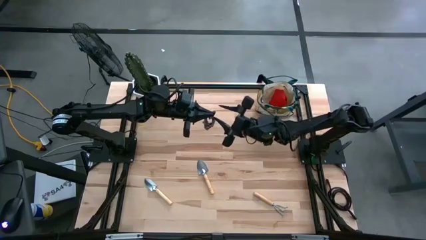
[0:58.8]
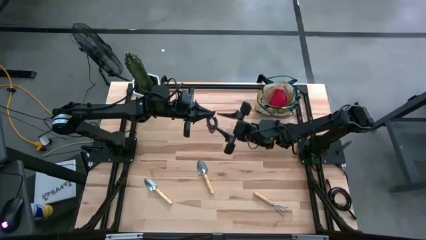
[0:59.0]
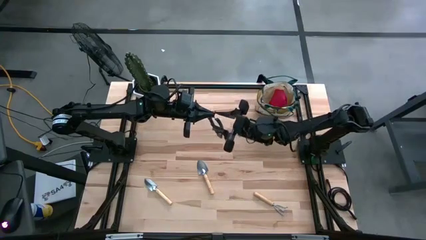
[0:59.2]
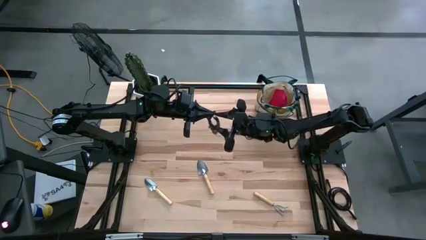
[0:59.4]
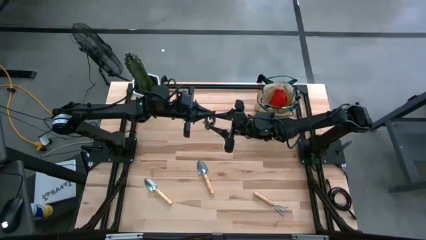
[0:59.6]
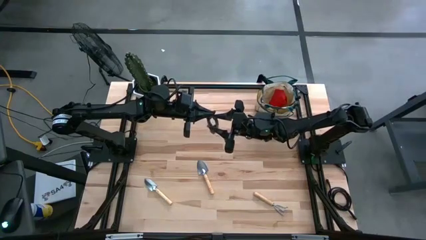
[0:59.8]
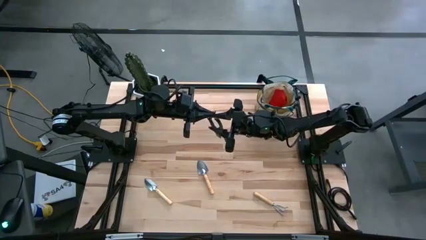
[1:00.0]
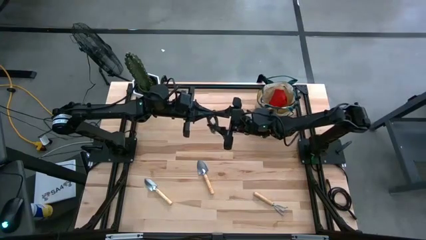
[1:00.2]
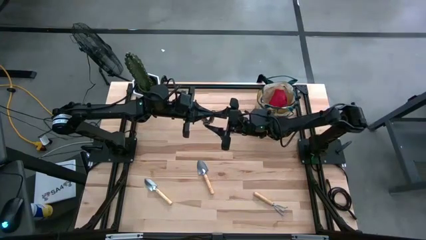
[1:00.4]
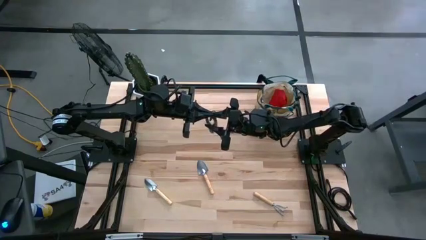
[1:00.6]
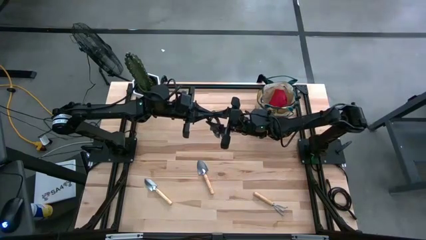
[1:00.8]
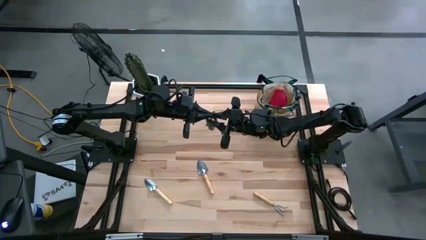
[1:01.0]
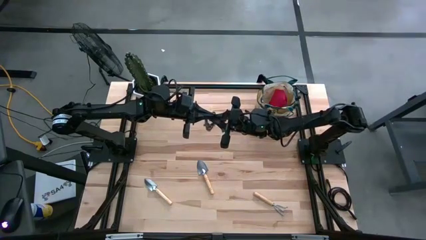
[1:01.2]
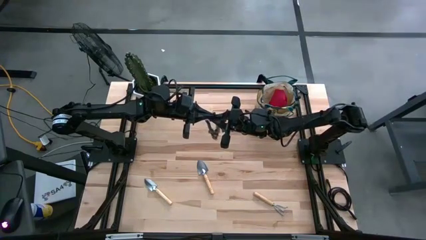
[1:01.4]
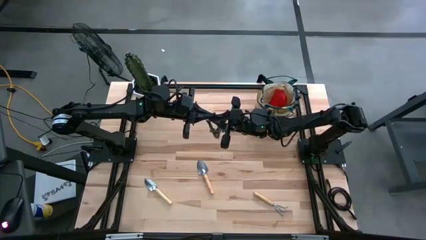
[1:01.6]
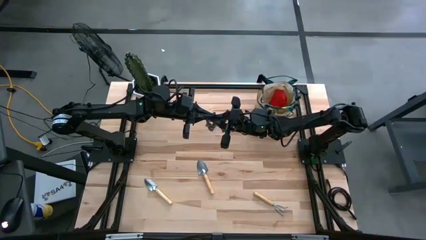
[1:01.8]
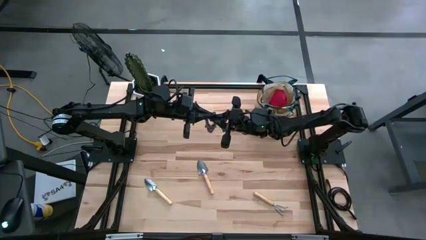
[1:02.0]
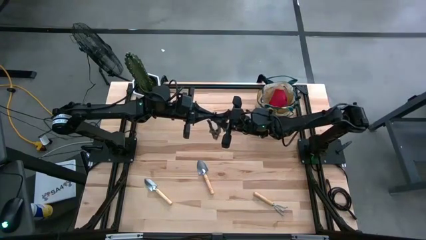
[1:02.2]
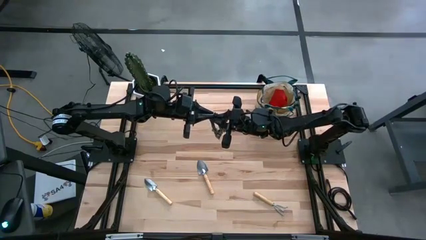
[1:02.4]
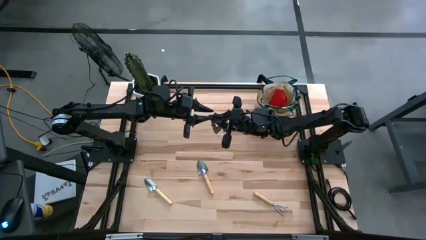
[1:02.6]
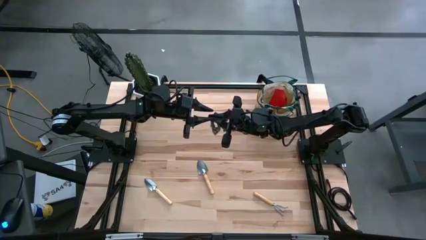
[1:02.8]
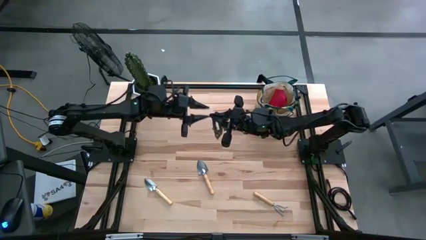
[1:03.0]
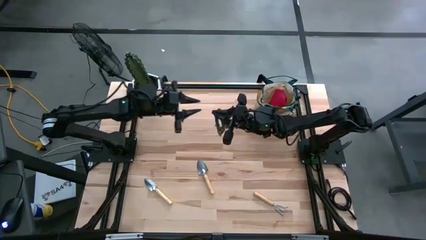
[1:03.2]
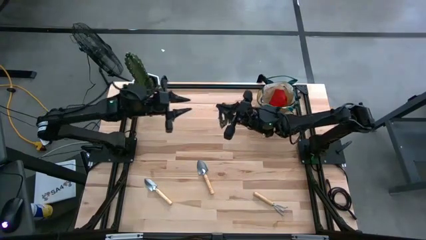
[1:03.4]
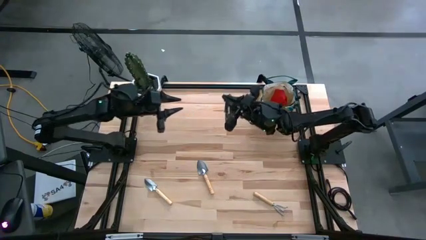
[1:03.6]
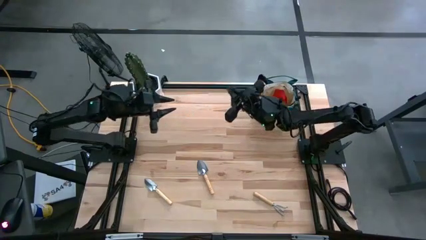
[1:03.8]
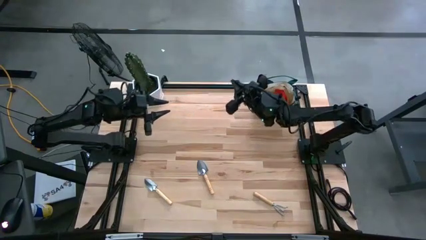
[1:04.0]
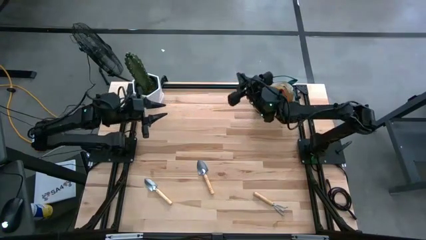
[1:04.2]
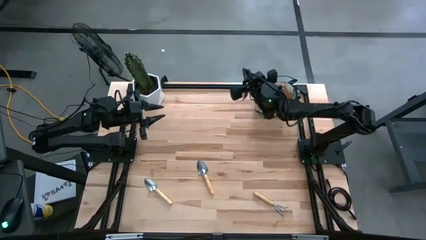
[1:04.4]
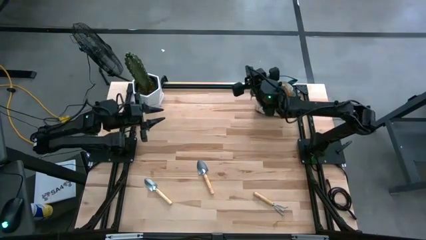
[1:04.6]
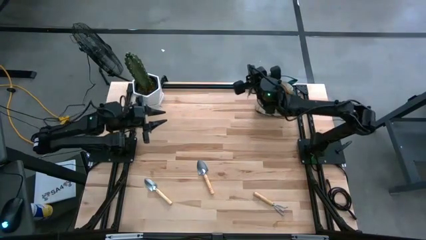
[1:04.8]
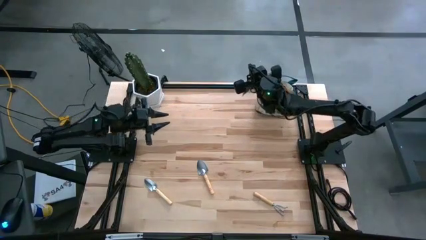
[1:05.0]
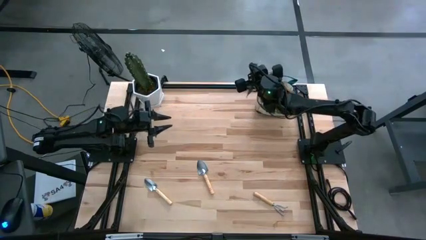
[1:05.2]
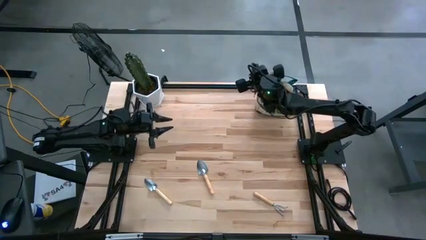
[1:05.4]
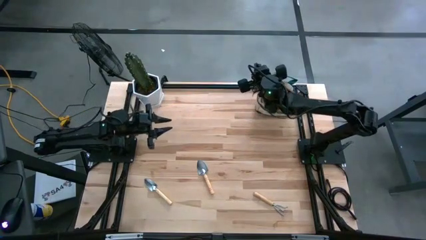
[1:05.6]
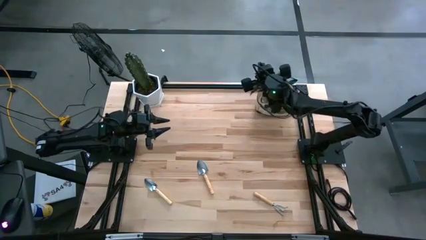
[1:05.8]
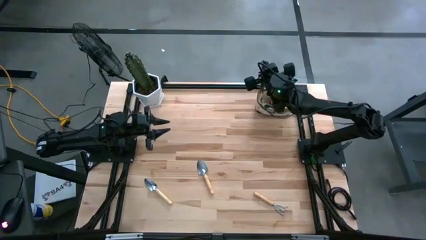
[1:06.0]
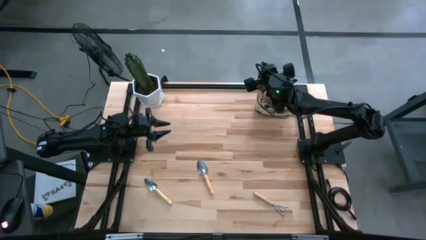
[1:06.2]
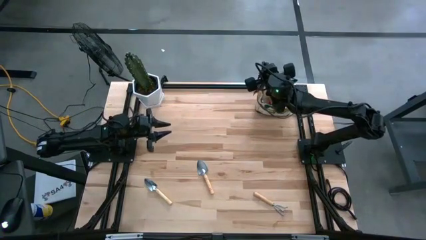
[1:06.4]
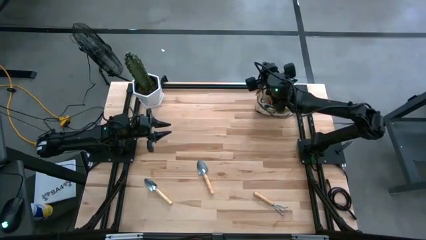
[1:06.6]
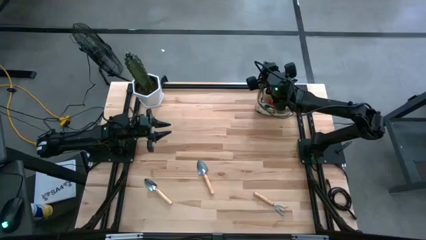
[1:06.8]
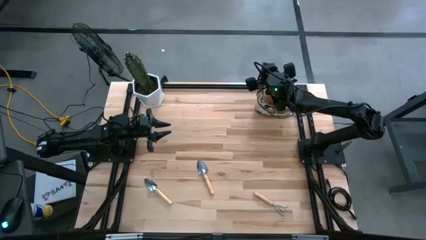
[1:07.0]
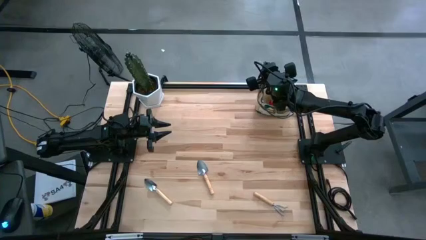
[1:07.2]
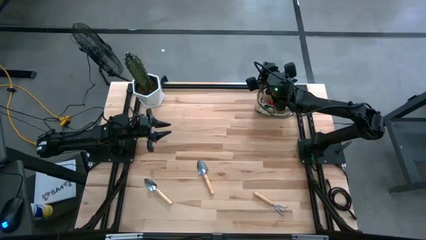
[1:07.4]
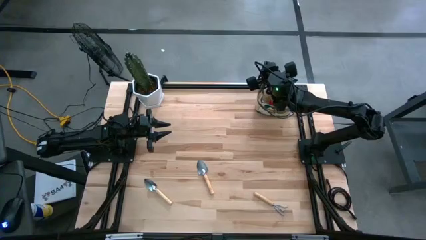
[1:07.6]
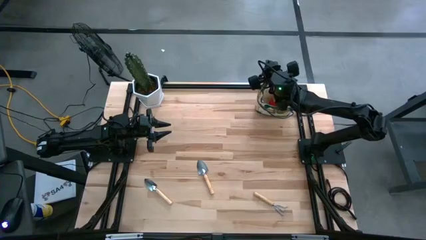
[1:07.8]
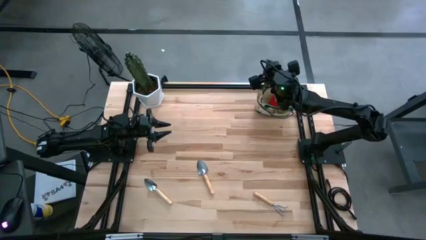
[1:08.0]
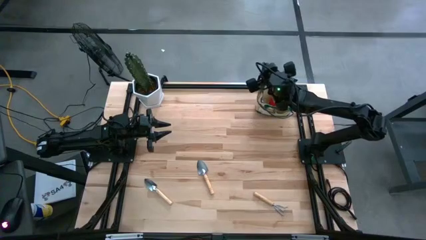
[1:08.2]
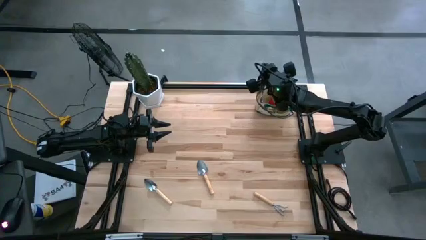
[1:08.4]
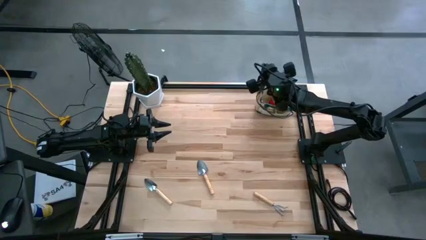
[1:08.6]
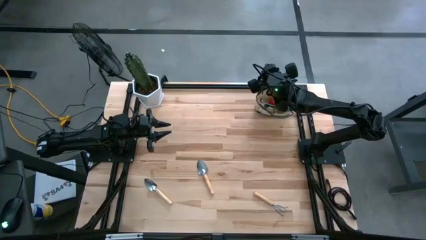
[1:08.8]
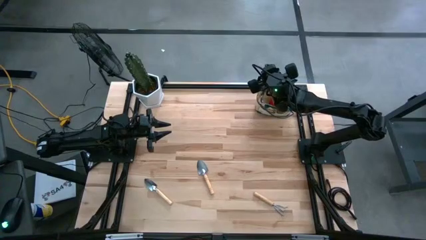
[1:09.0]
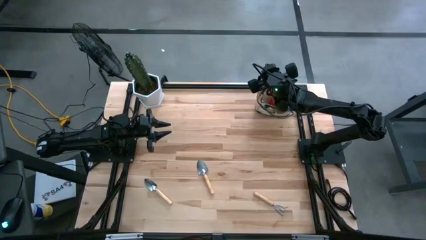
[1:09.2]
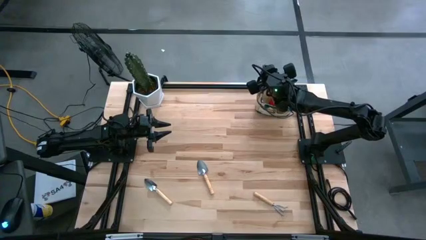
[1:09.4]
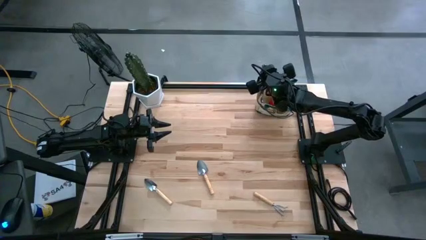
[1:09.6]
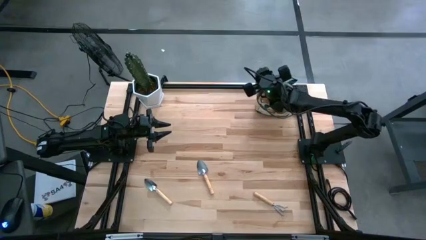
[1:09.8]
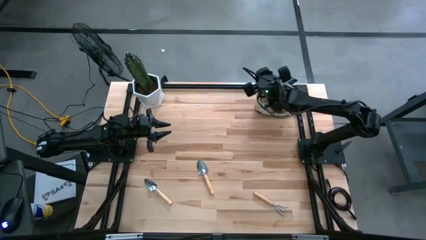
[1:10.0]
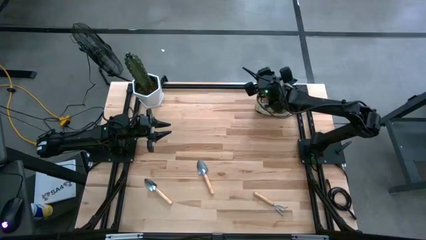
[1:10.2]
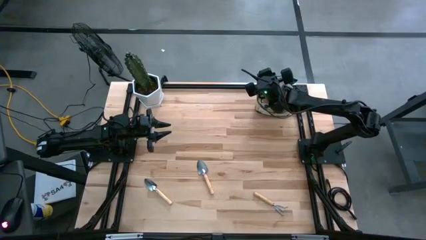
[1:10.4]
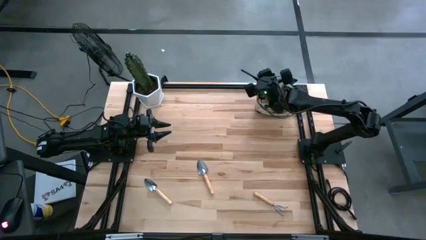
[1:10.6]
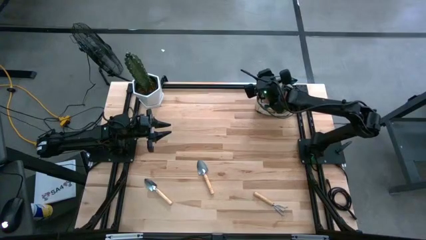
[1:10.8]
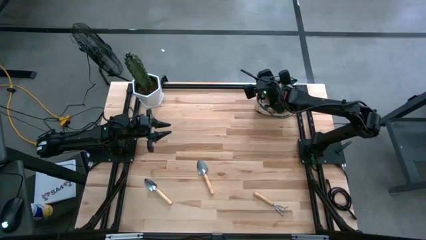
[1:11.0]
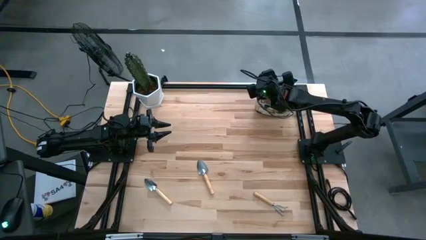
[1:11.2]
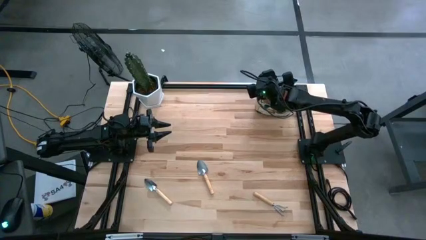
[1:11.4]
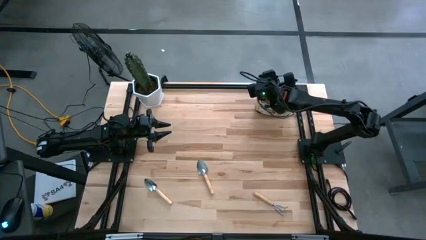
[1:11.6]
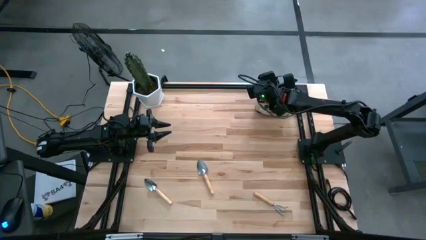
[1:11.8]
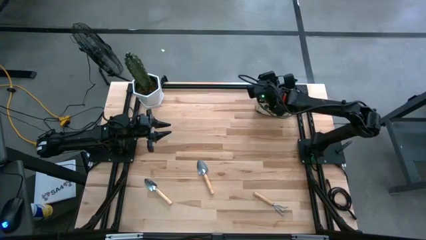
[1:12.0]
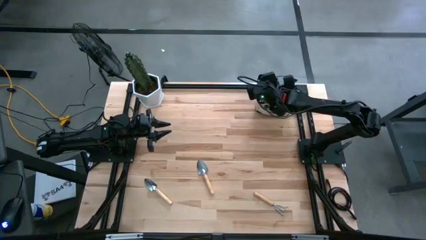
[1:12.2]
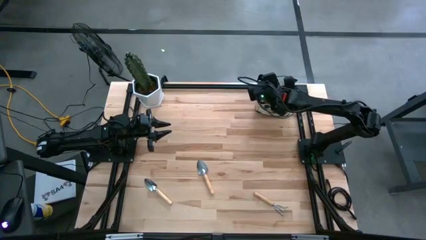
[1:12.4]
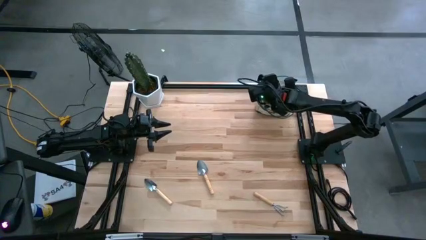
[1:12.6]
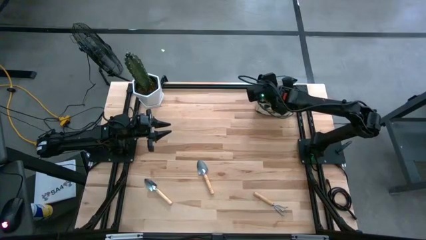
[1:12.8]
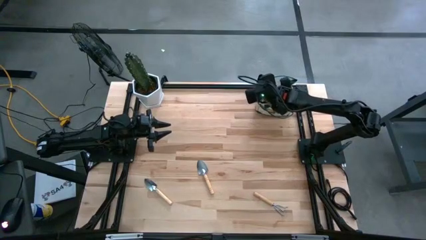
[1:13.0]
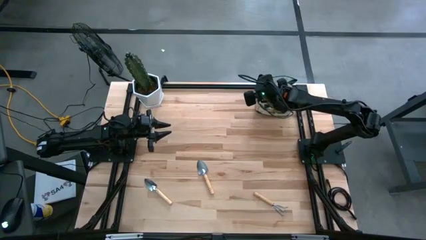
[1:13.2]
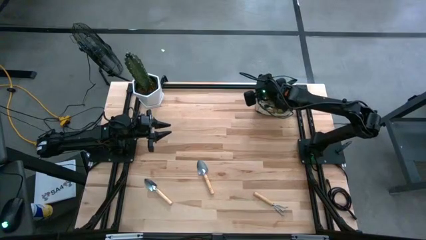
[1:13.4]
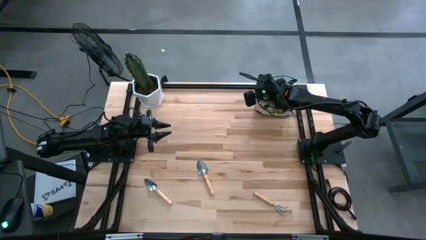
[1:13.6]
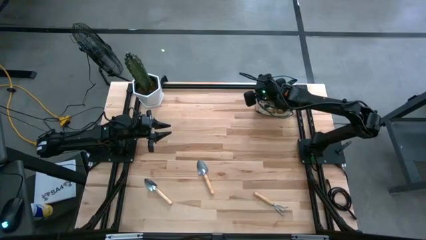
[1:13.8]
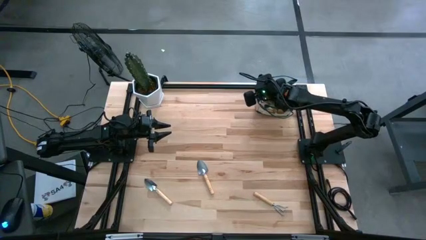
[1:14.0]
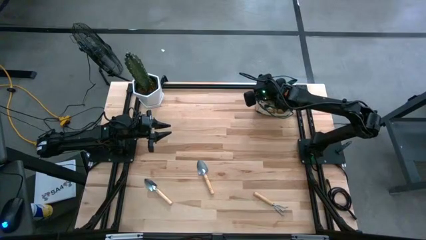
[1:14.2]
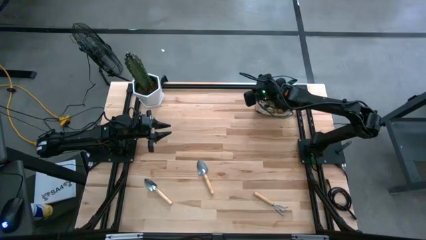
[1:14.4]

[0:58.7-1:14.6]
Task: Pick & Place Garden tools in Gardening bag
Put the green shear scissor into the gardening bag
